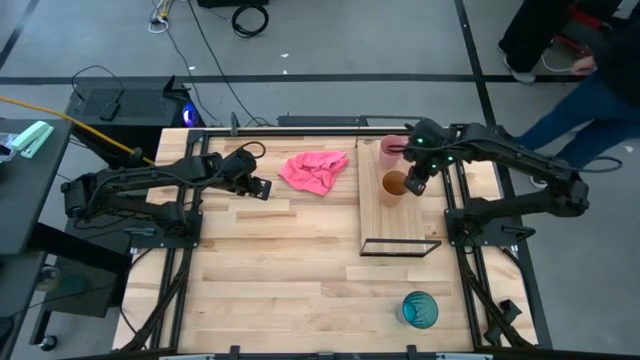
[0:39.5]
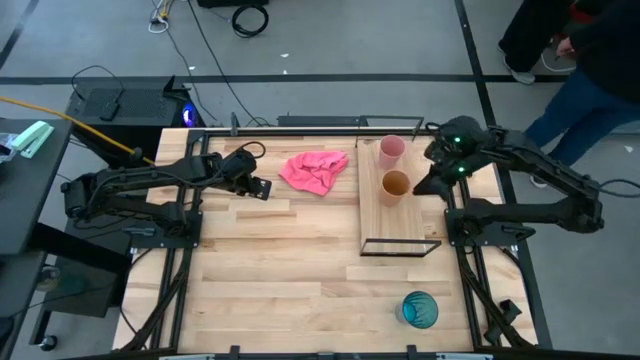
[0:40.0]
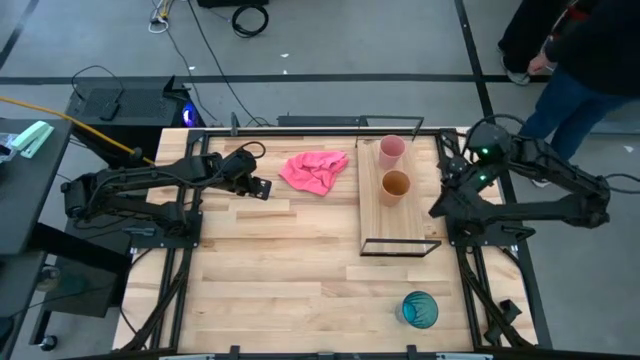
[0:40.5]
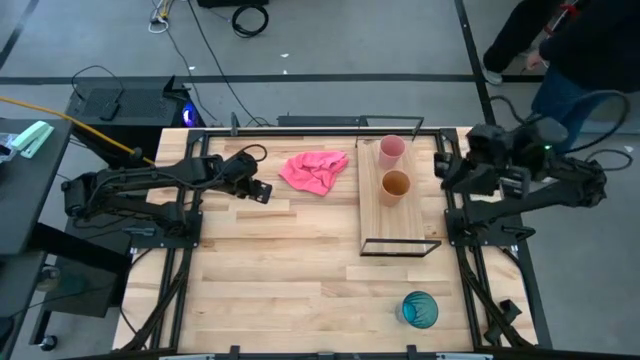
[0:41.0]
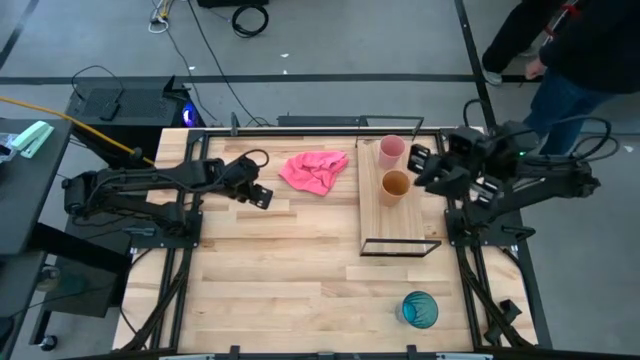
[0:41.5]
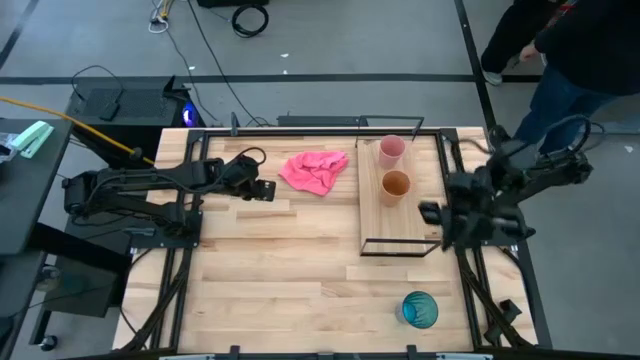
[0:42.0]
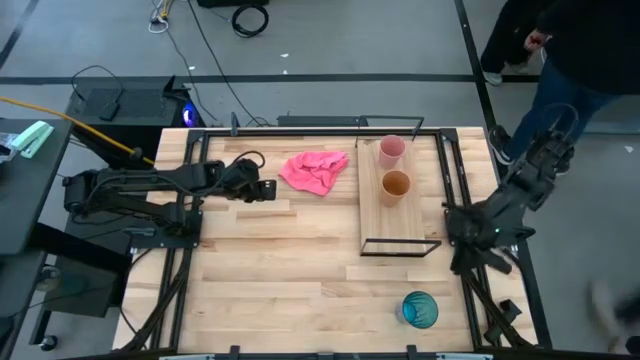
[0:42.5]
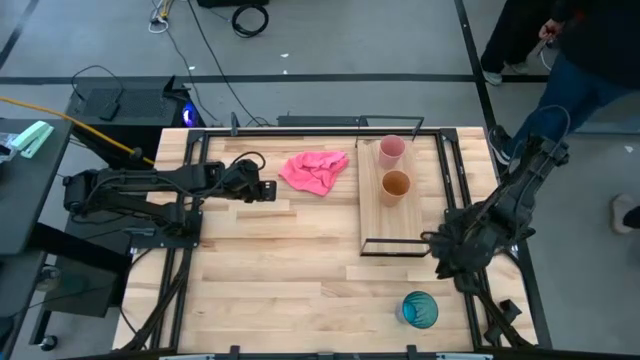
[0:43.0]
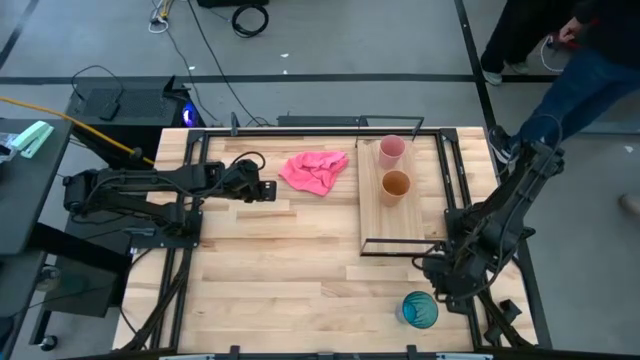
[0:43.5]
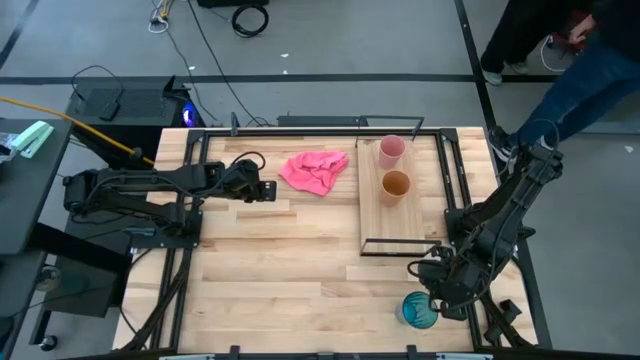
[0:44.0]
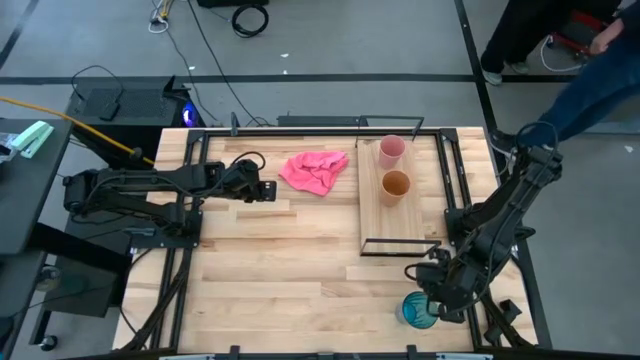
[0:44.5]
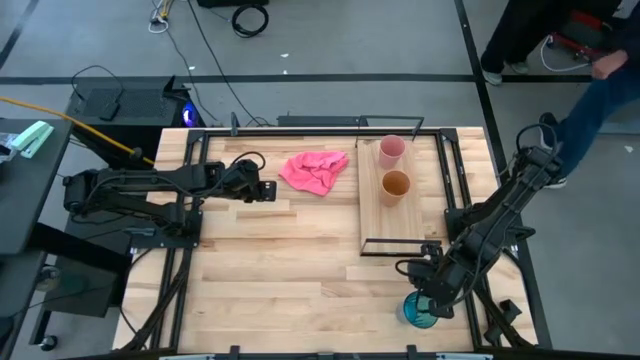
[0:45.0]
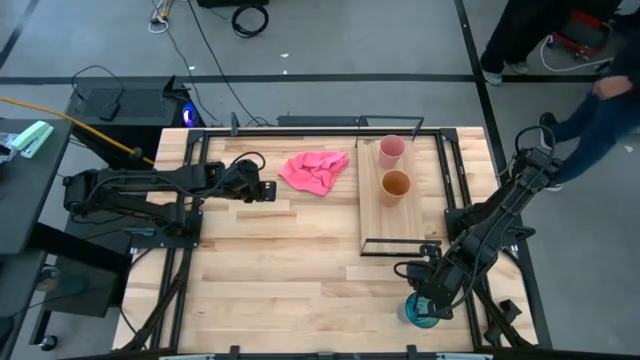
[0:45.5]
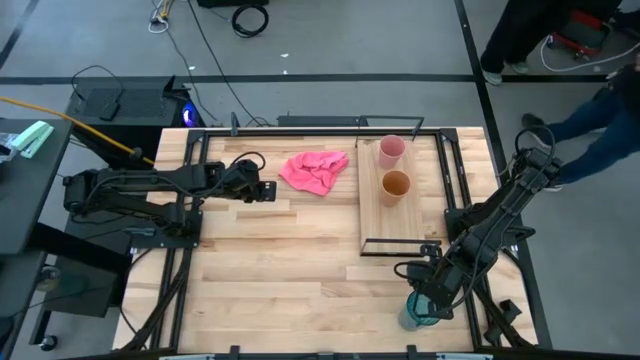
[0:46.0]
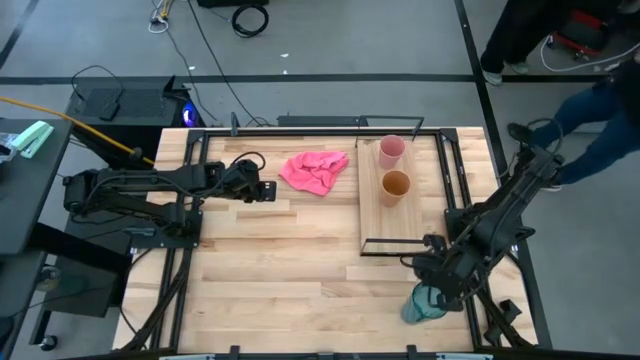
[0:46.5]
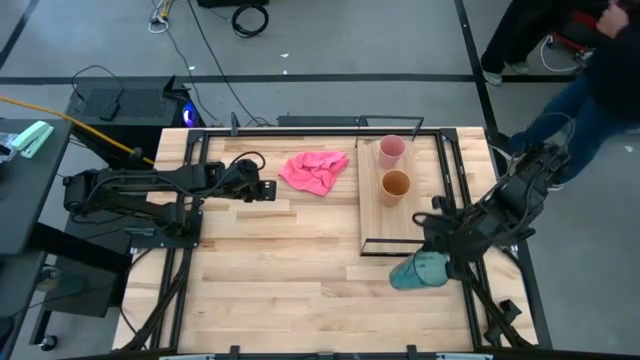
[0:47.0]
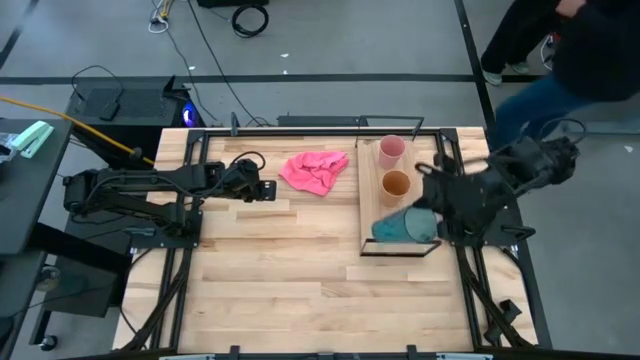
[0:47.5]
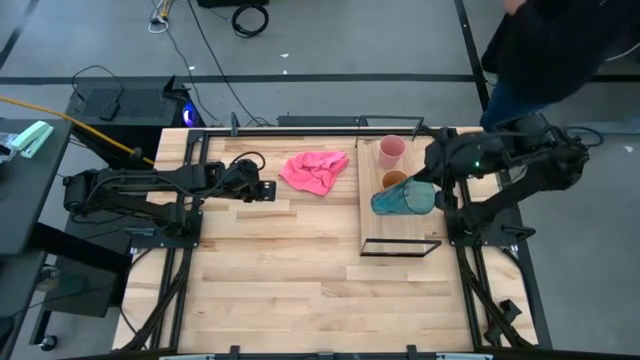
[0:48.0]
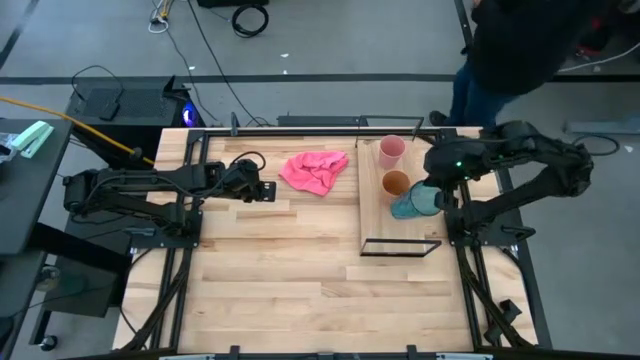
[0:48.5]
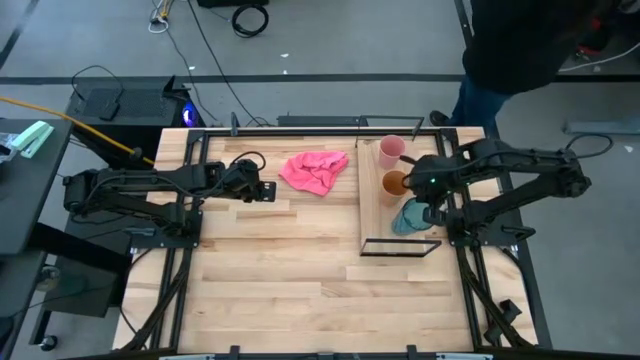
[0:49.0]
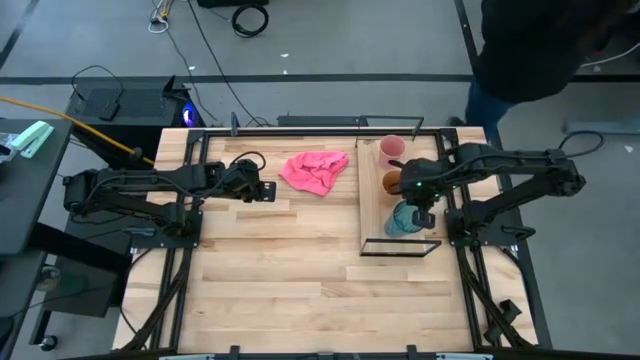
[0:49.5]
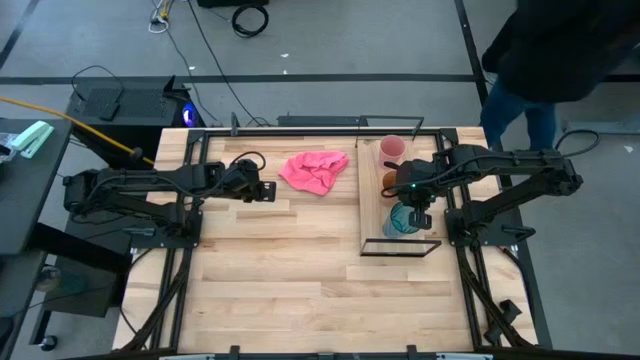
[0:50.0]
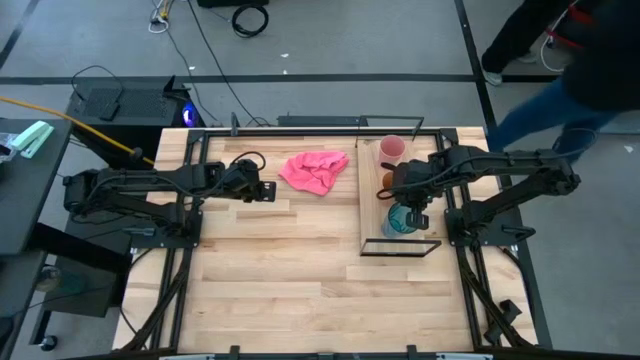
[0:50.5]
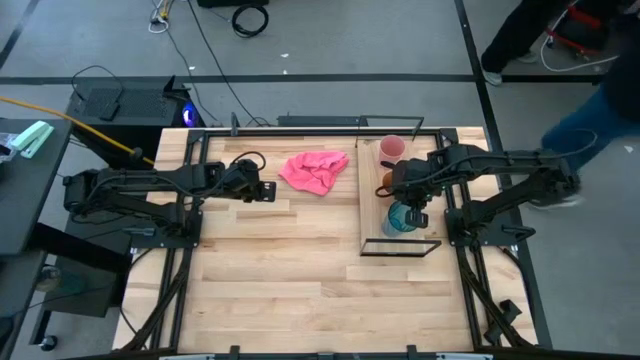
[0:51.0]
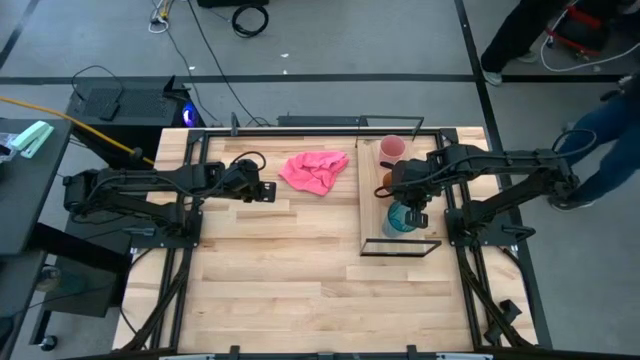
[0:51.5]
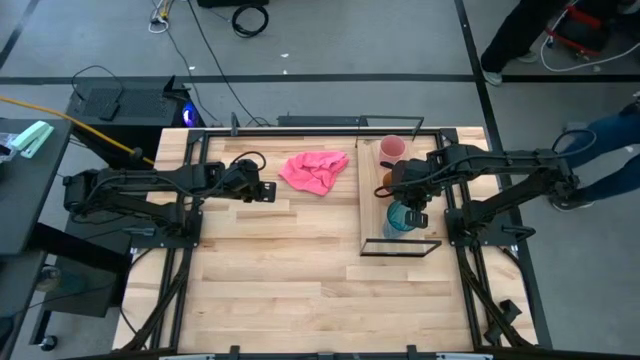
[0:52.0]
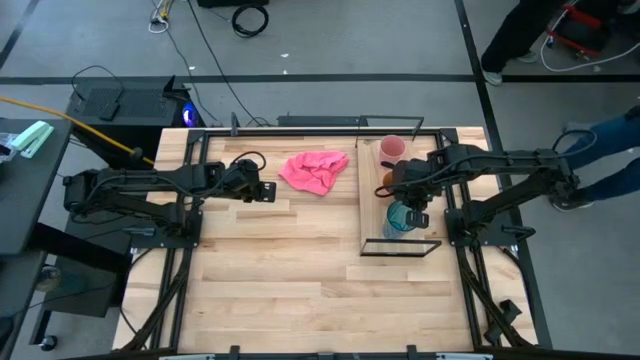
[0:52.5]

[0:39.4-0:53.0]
Task: Stack small to large cups/mugs on shelf
Put the blue cup on the shelf
